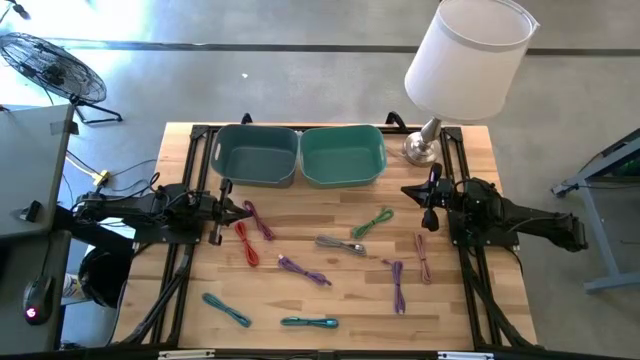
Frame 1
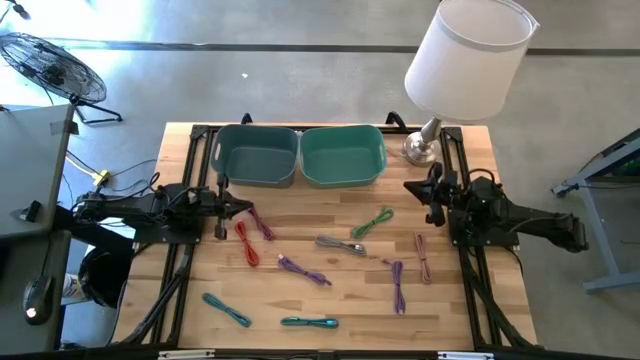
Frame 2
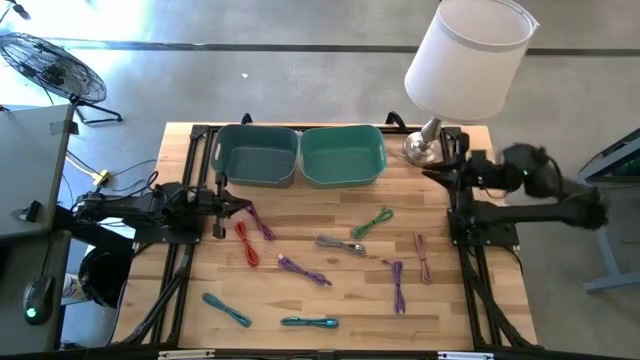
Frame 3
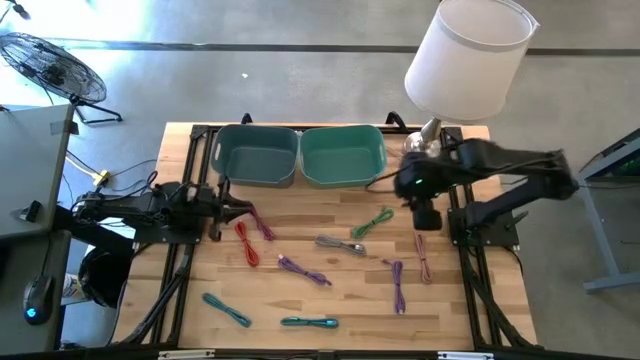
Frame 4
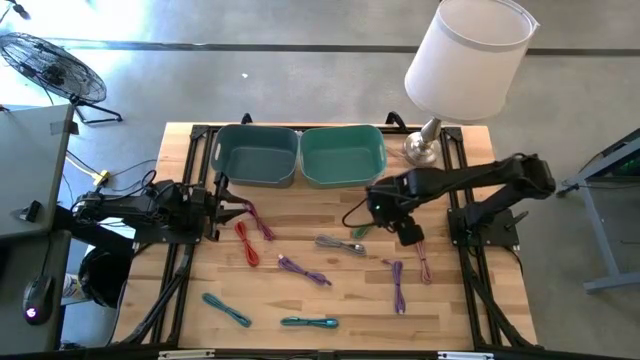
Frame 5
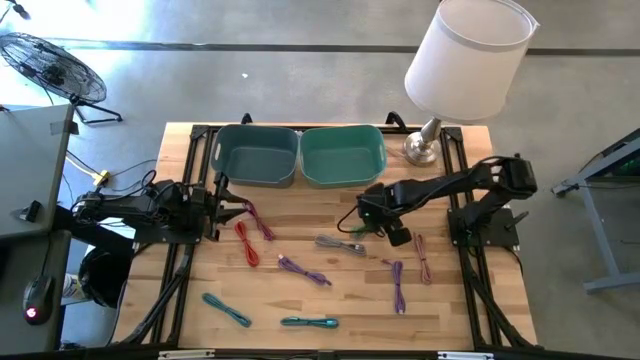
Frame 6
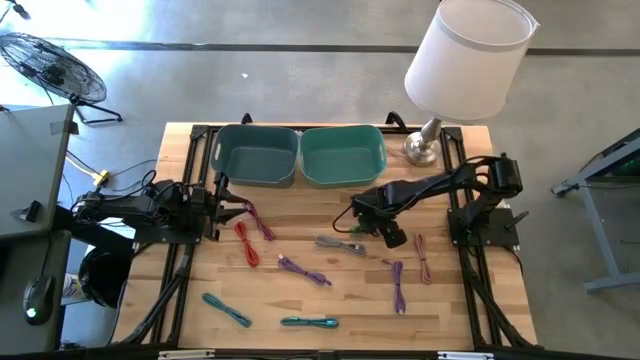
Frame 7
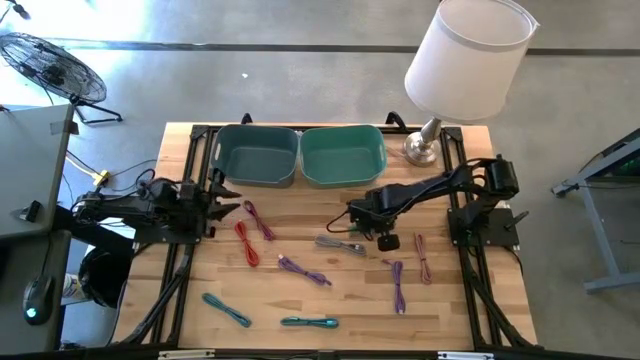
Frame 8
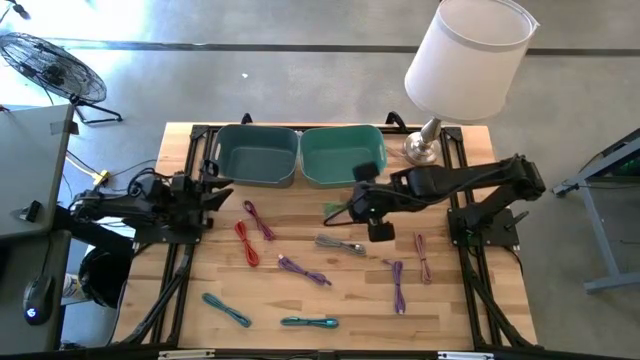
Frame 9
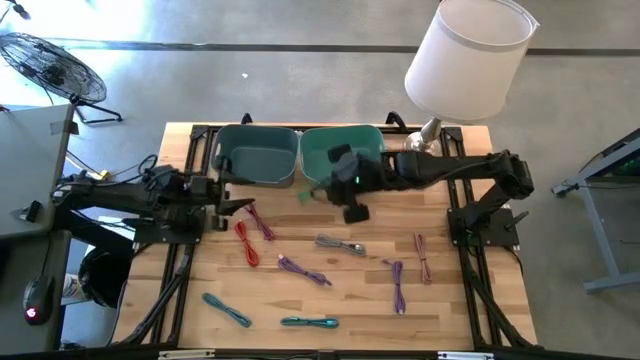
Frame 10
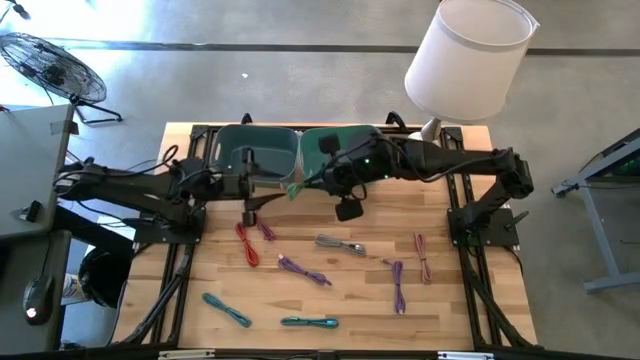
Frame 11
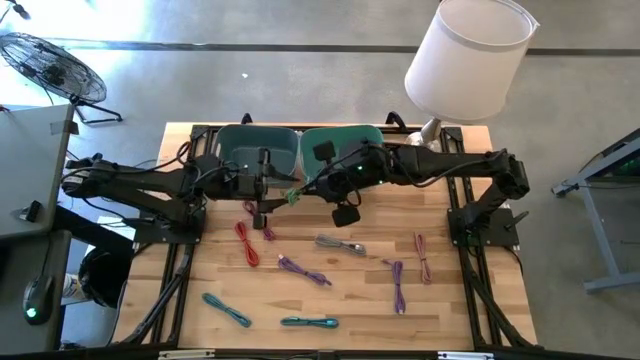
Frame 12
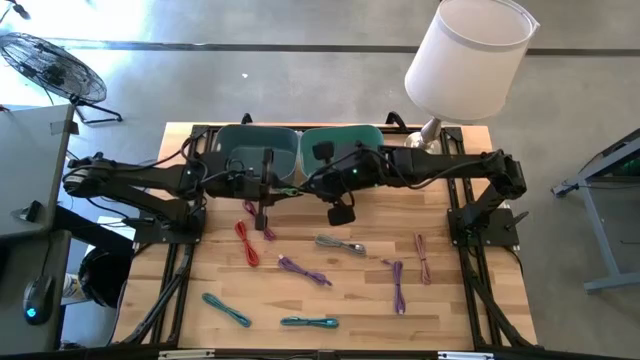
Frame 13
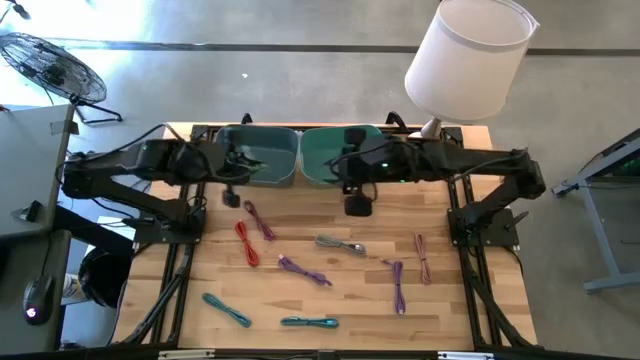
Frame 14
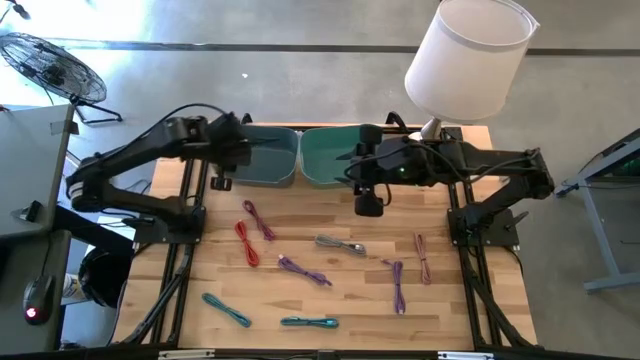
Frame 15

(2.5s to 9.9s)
Task: Pick & Place USB Port
Put the green charger cable into the blue bin

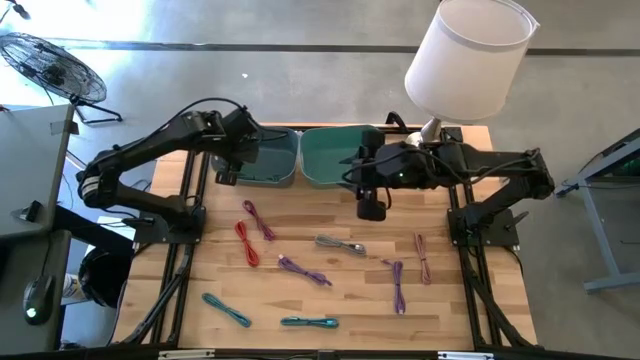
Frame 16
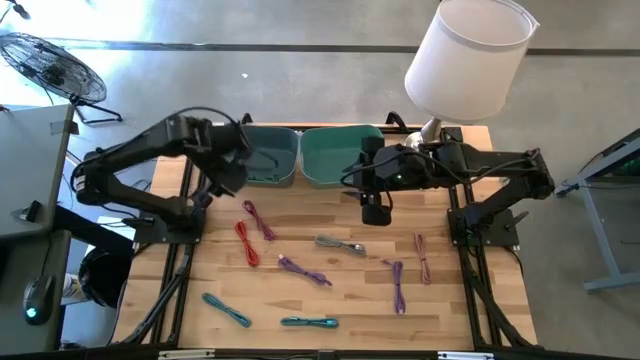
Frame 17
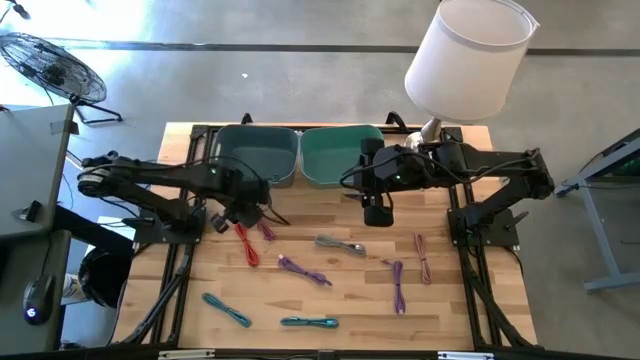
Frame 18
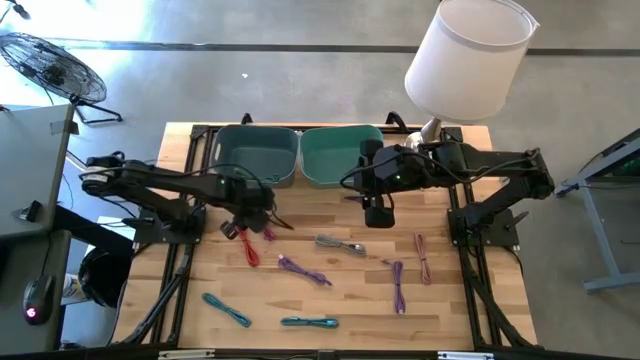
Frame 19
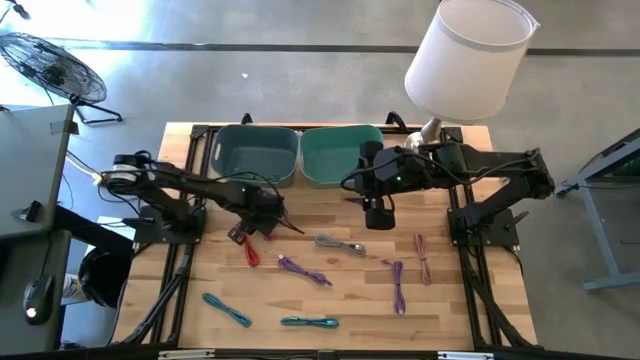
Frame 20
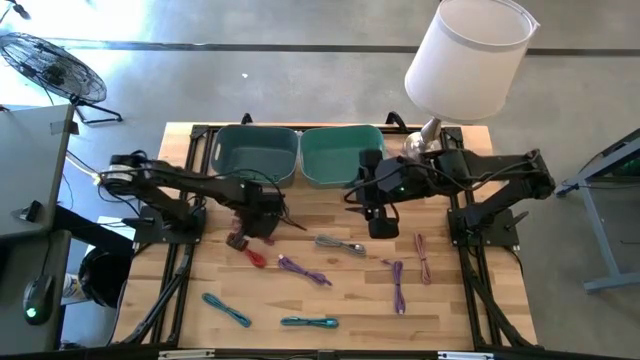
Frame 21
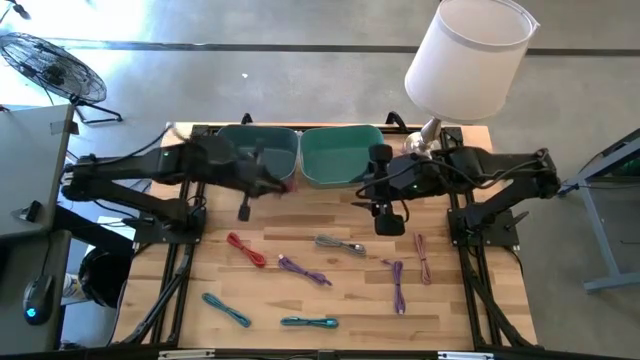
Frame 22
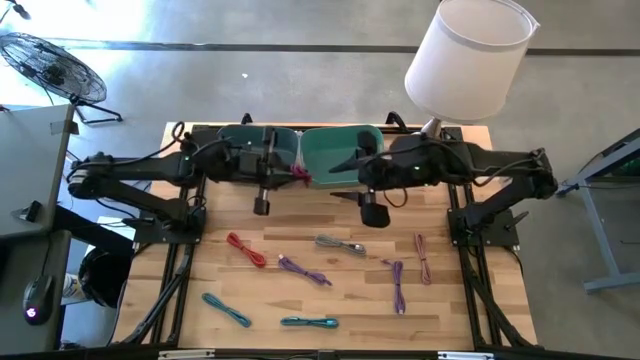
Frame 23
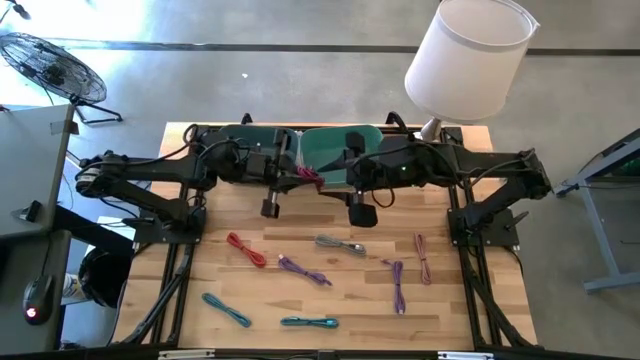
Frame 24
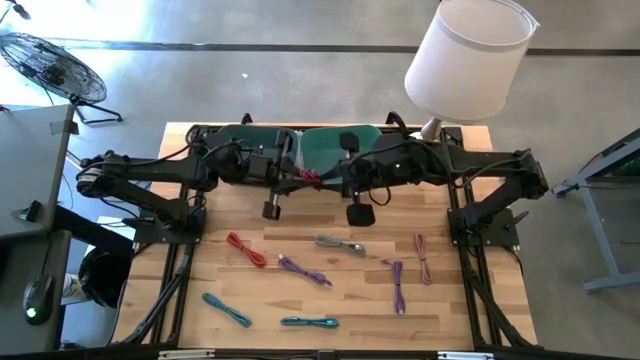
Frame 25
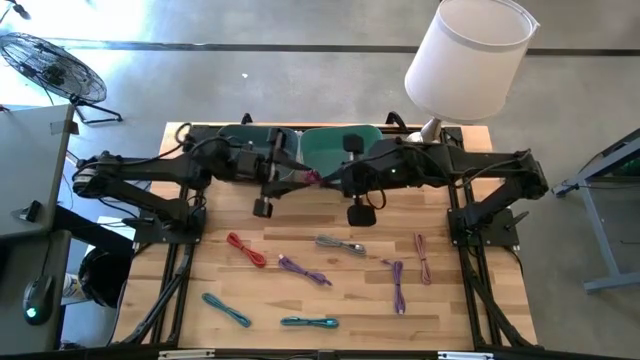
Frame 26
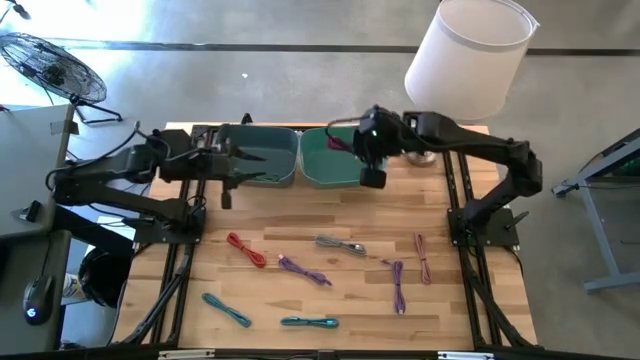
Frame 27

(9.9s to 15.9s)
Put the black and pink charger cable into the green bin

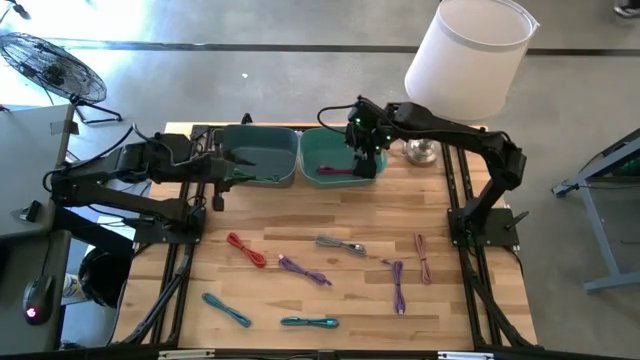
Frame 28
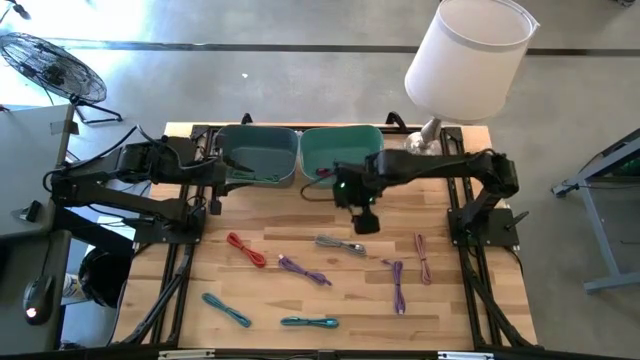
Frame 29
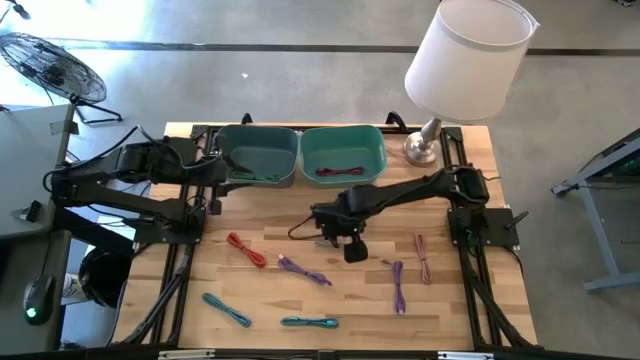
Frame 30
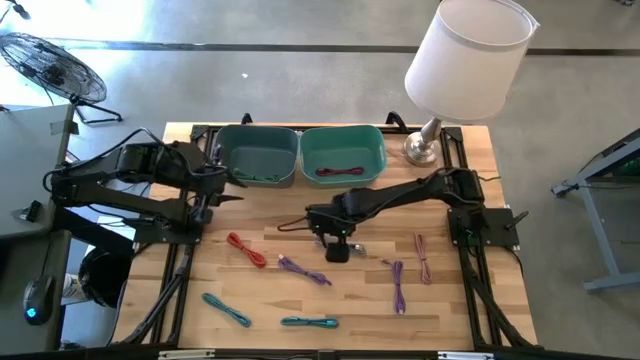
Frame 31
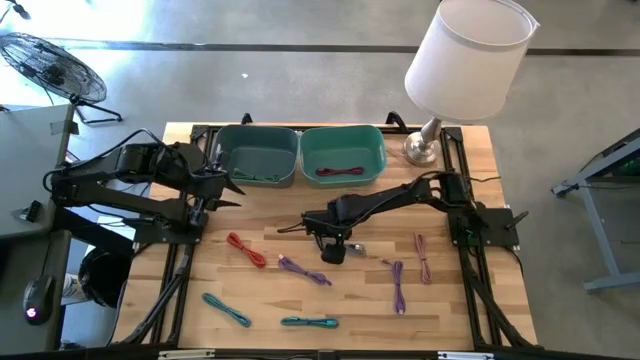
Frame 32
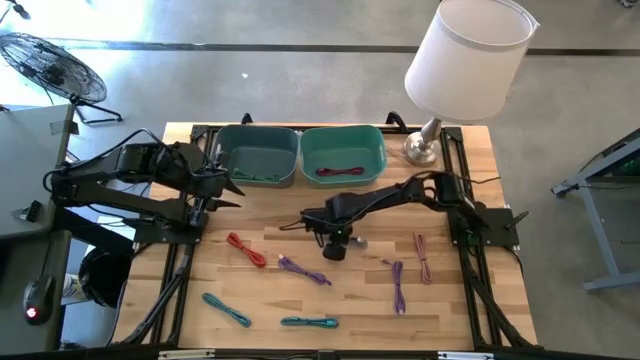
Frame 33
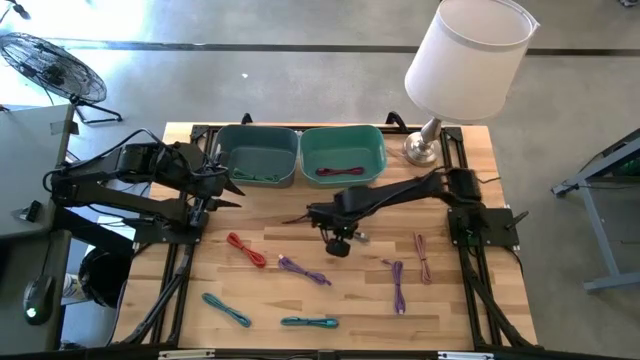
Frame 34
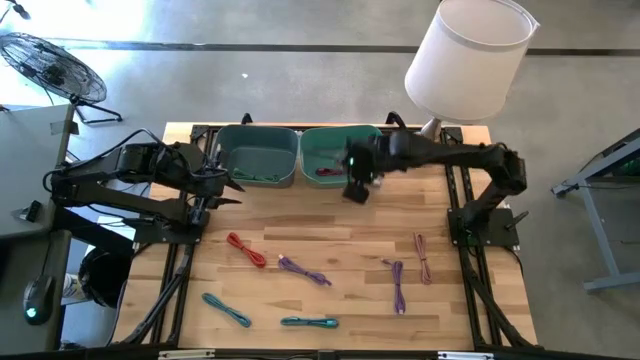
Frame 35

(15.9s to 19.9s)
Put the black and white charger cable into the green bin

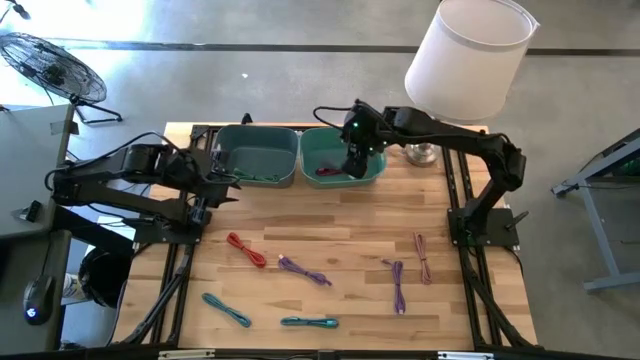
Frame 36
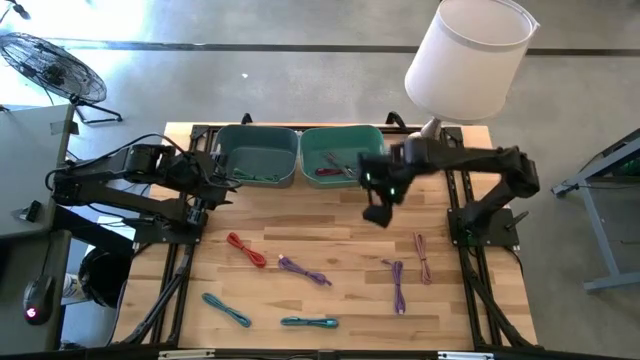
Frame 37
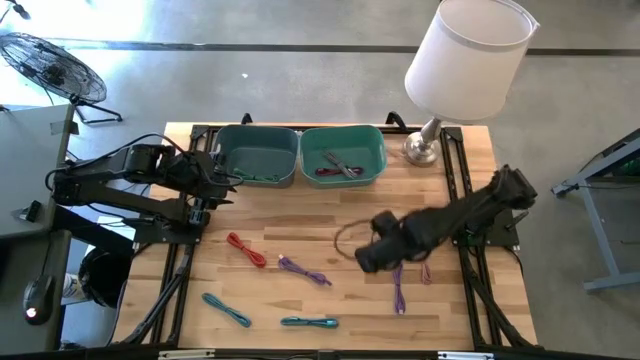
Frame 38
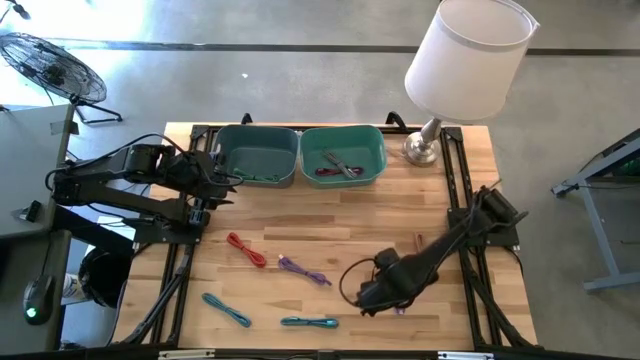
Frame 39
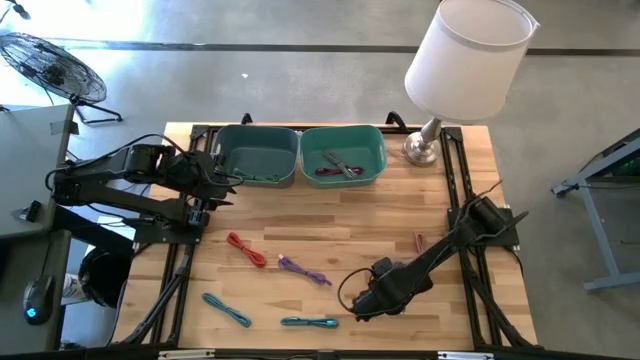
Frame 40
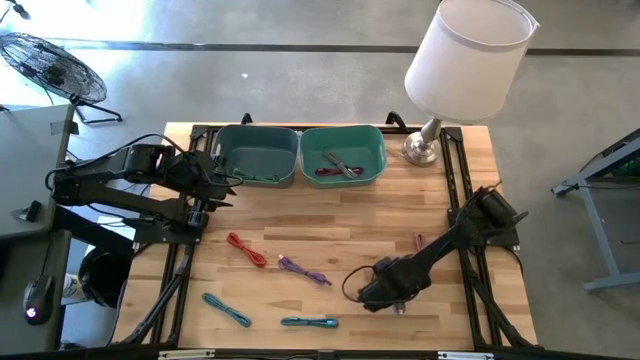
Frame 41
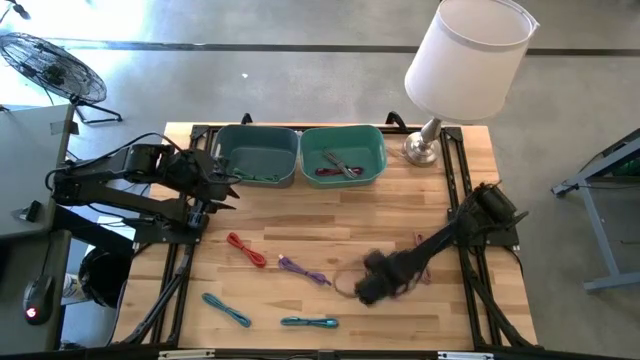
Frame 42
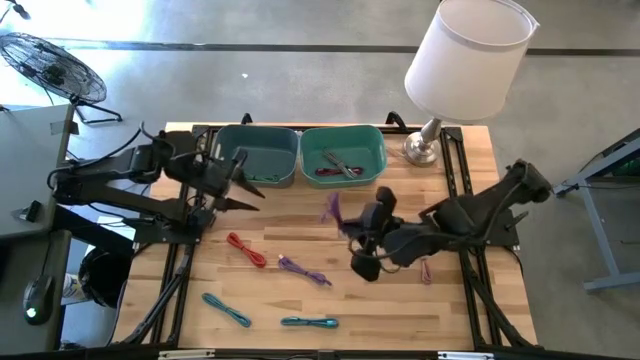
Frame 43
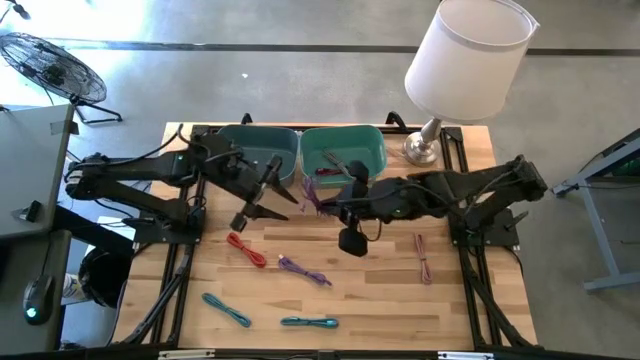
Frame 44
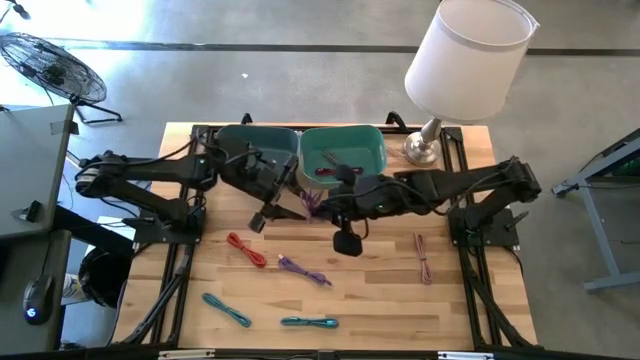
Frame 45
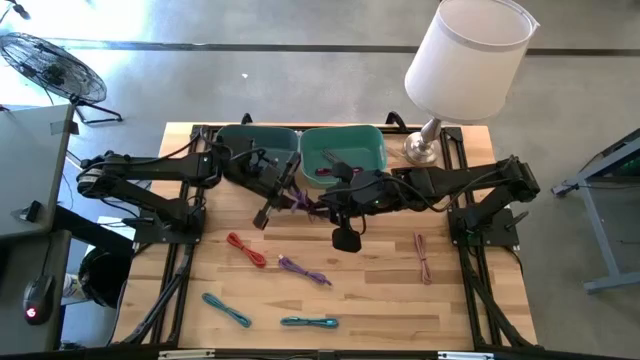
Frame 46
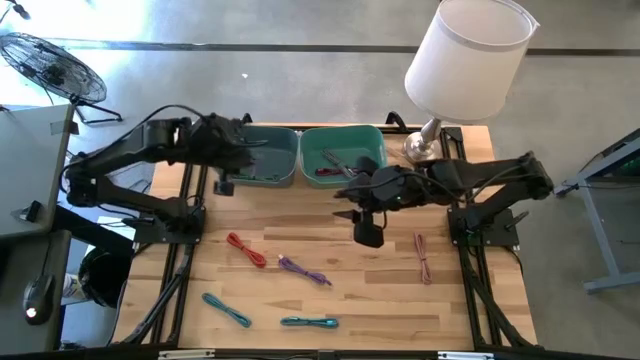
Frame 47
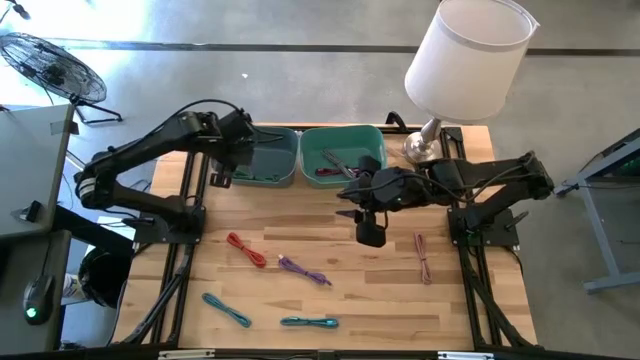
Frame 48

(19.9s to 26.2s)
Put the right purple charger cable into the blue bin
